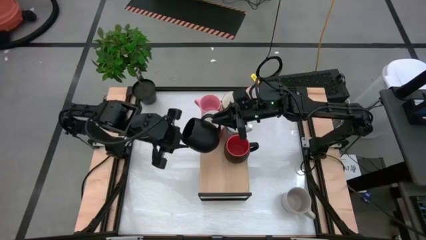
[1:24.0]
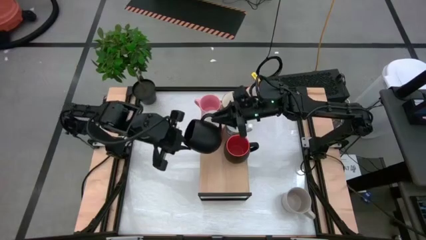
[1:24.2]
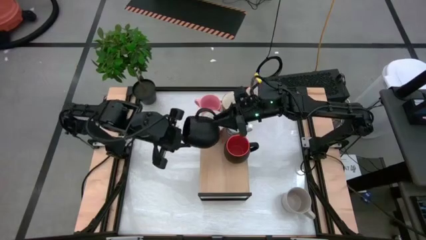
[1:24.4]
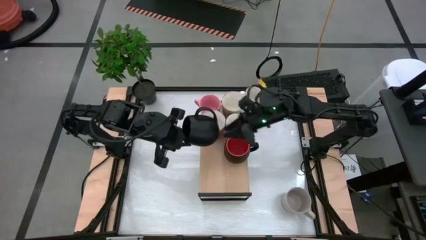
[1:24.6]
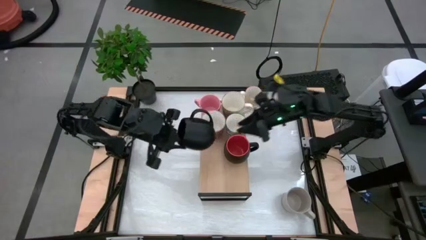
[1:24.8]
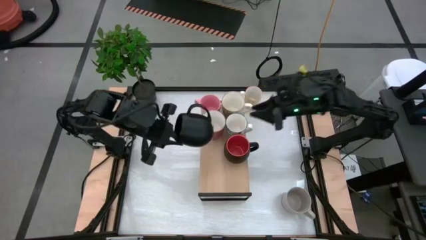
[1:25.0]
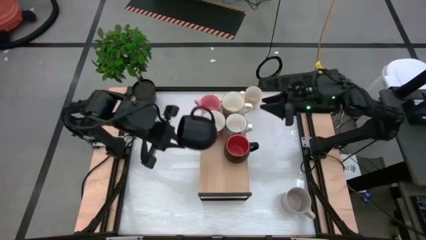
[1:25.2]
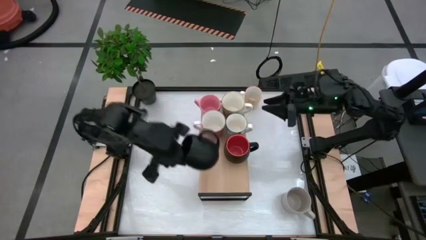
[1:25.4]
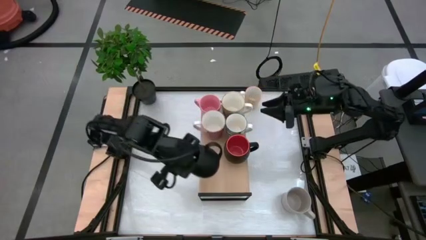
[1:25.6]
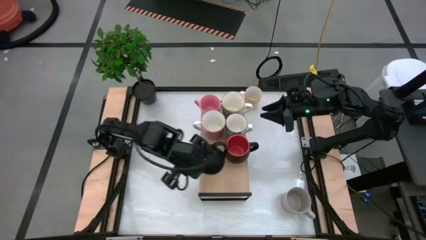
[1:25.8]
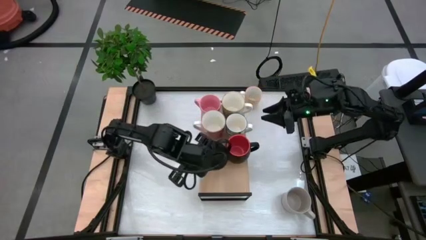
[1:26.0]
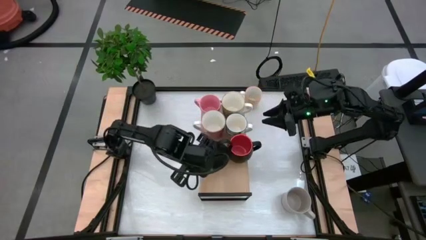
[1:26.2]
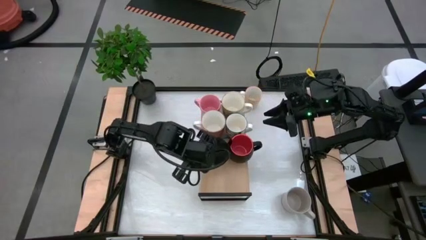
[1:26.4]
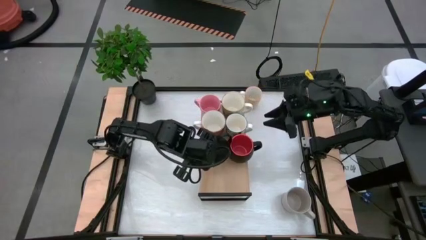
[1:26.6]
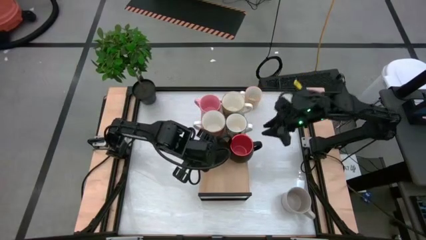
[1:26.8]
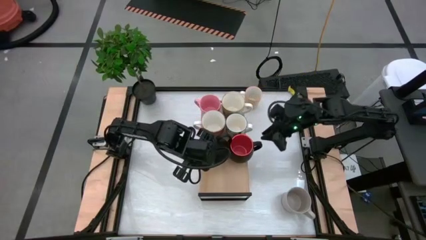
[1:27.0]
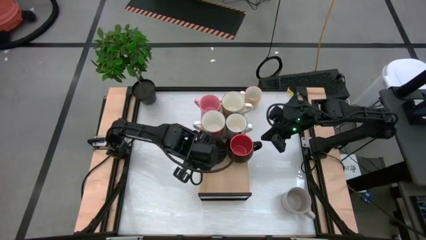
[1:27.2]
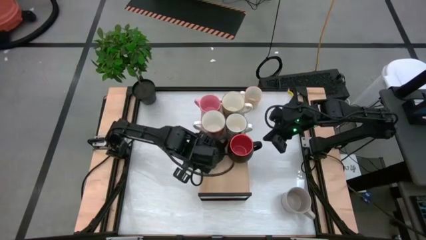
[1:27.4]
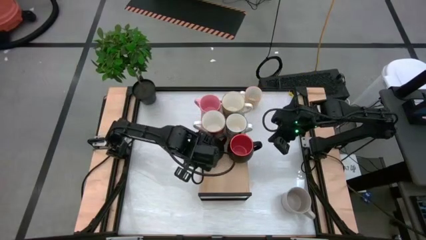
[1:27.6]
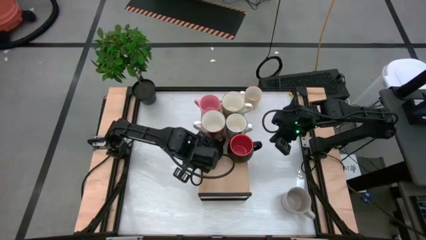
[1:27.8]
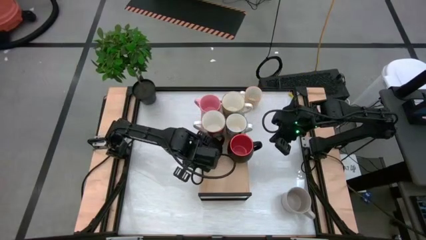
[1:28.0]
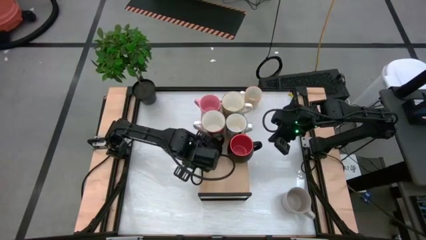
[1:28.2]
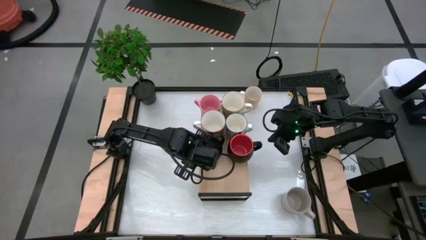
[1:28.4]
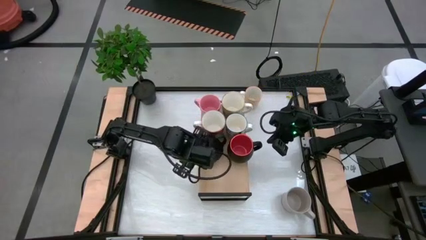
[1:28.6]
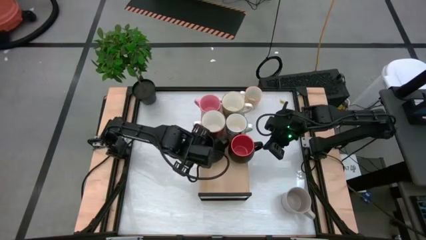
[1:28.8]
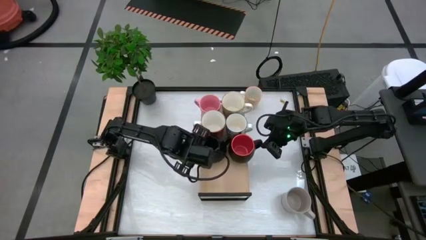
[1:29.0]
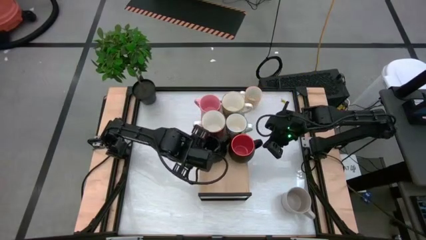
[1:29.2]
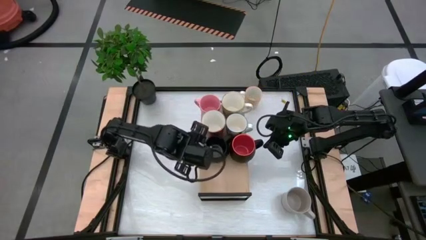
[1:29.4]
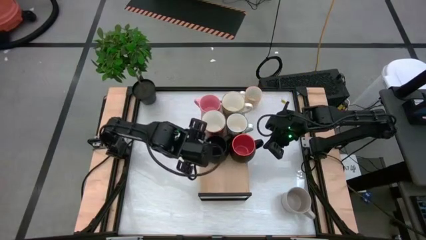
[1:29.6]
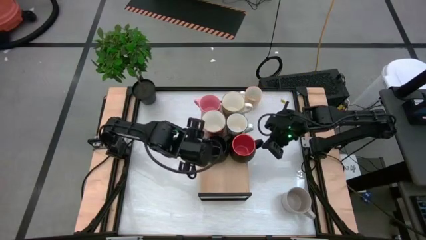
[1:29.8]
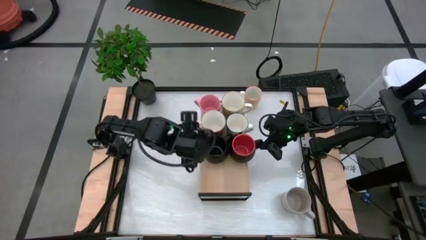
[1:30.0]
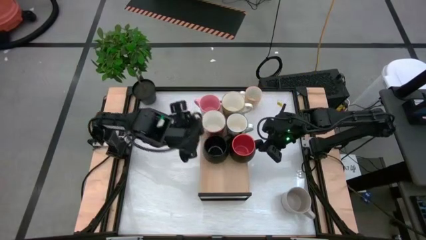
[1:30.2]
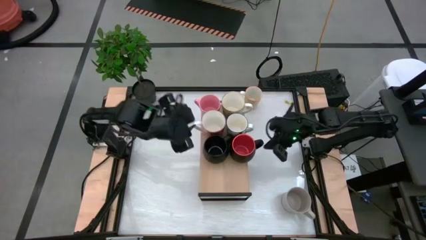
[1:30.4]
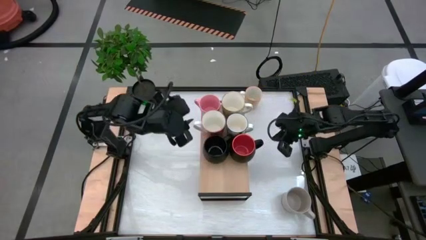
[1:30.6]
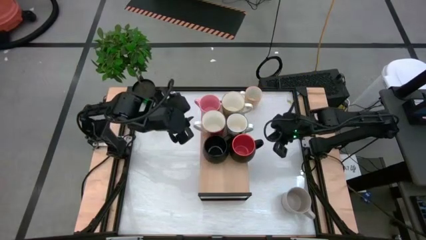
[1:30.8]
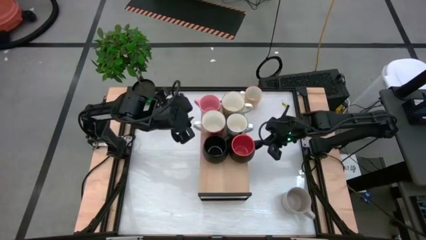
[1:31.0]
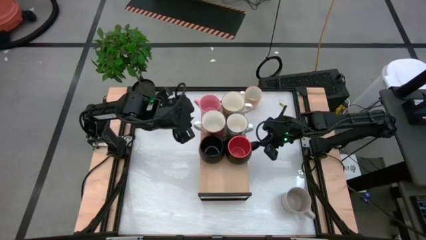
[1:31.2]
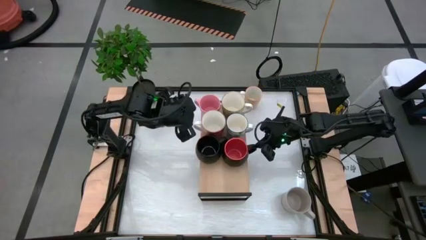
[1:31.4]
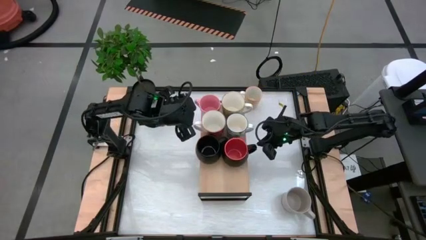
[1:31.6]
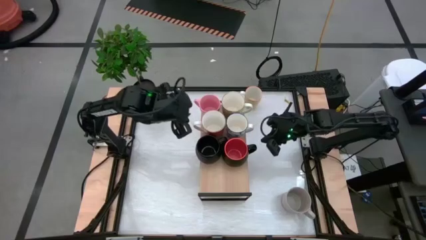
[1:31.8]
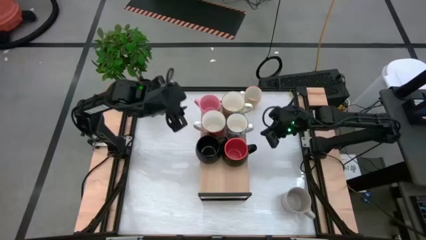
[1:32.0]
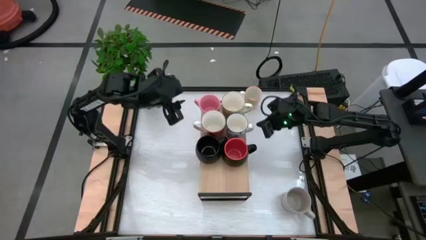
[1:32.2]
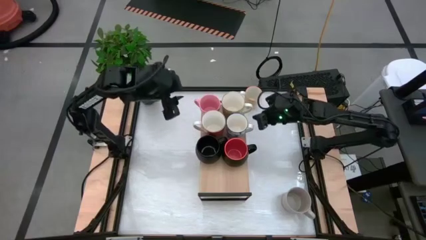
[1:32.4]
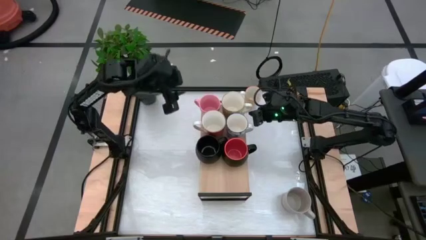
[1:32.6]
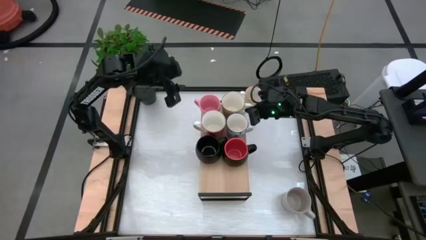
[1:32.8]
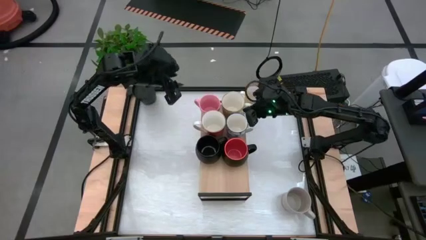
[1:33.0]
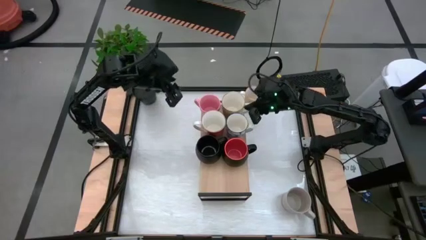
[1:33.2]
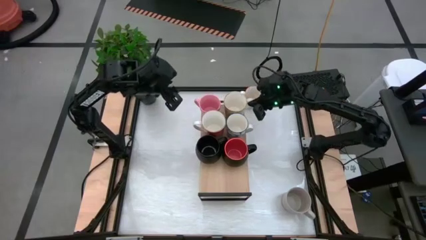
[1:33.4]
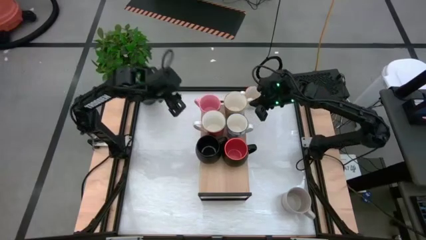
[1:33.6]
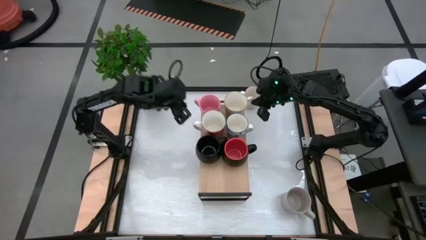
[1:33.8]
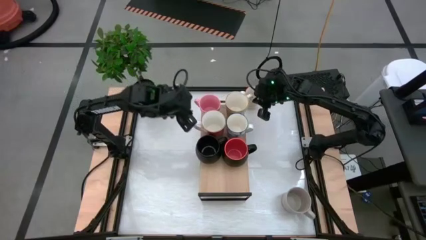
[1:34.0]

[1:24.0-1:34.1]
Task: Place coffee mugs
Put the black mug on the shelf
